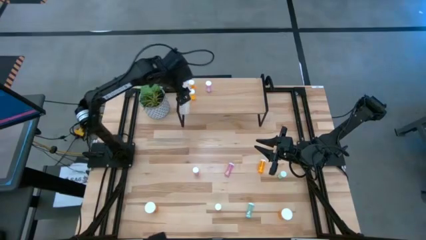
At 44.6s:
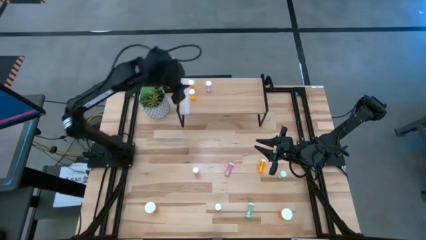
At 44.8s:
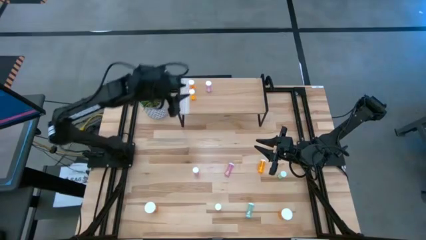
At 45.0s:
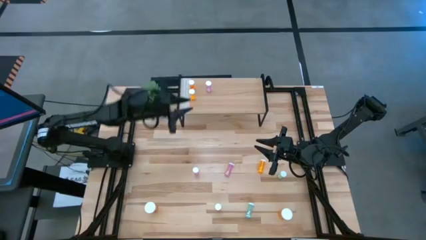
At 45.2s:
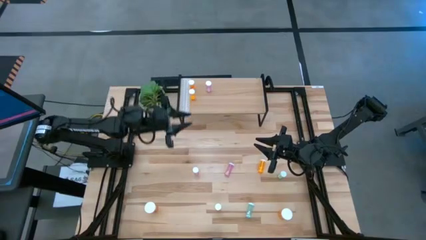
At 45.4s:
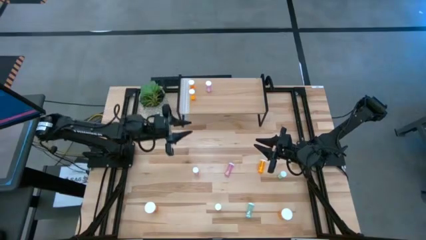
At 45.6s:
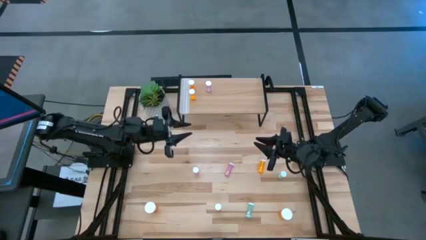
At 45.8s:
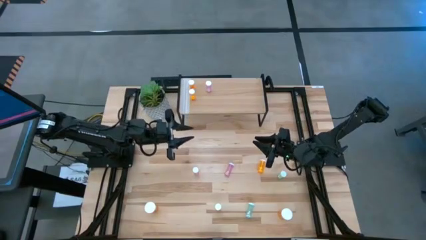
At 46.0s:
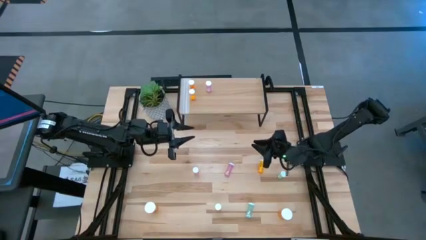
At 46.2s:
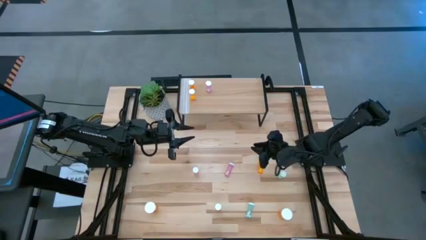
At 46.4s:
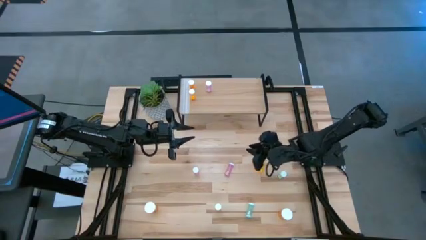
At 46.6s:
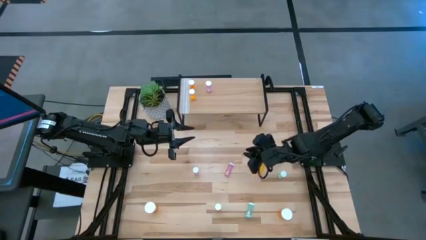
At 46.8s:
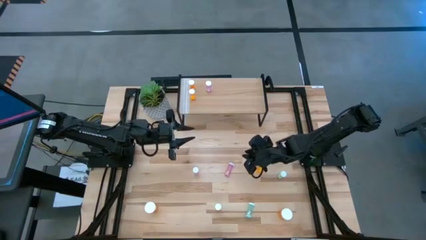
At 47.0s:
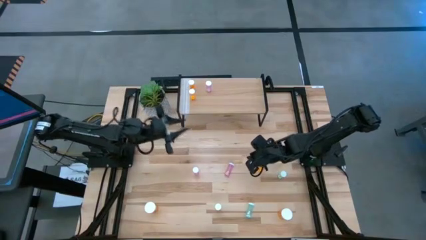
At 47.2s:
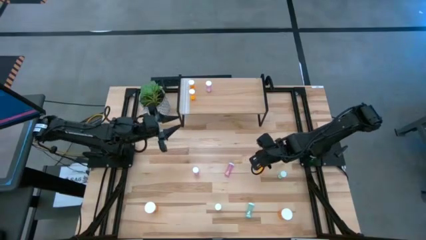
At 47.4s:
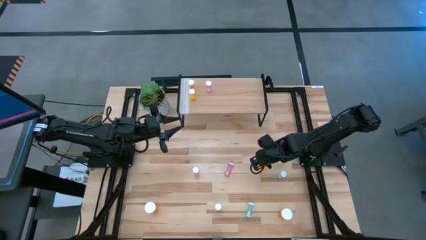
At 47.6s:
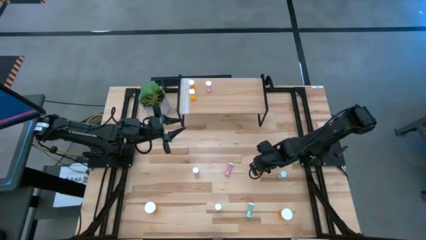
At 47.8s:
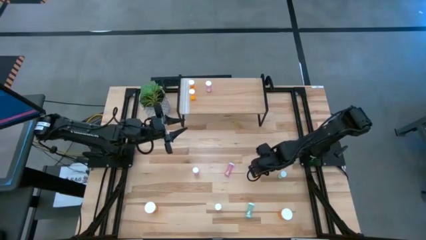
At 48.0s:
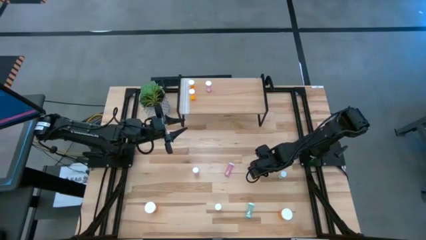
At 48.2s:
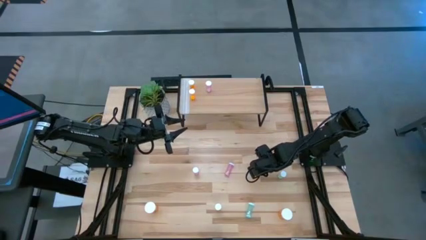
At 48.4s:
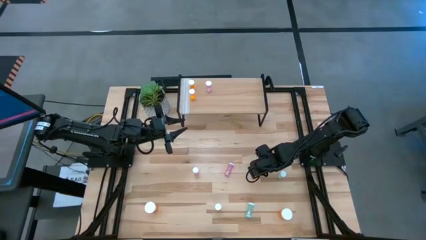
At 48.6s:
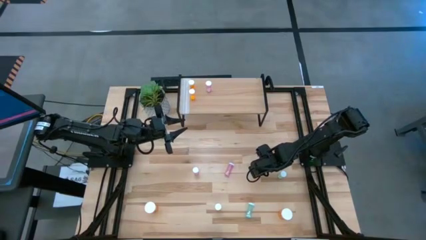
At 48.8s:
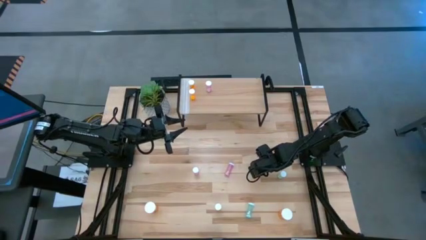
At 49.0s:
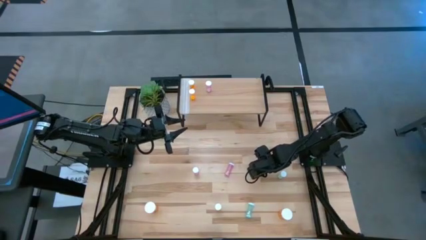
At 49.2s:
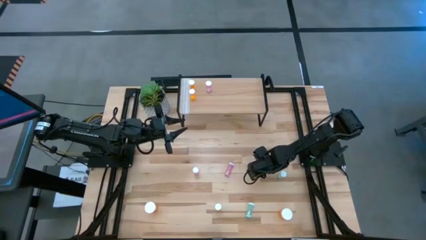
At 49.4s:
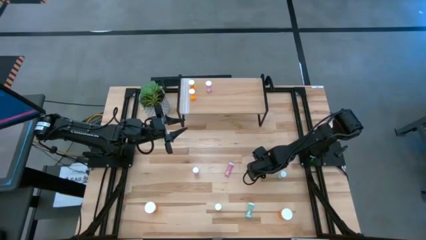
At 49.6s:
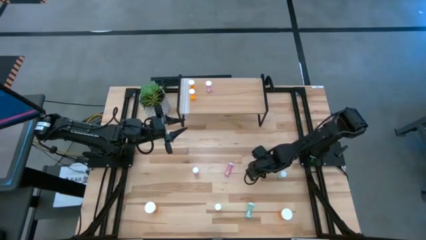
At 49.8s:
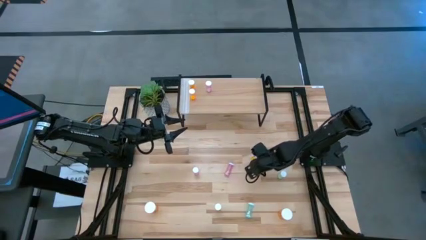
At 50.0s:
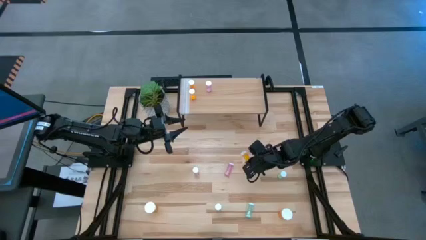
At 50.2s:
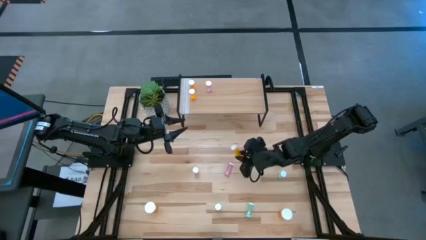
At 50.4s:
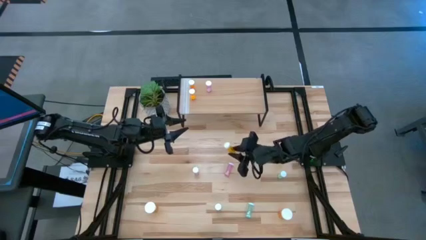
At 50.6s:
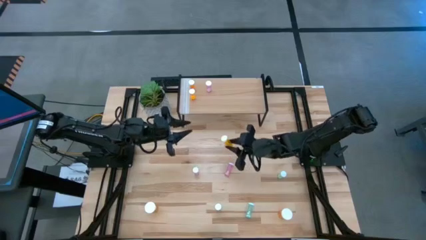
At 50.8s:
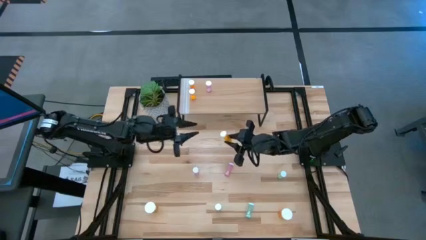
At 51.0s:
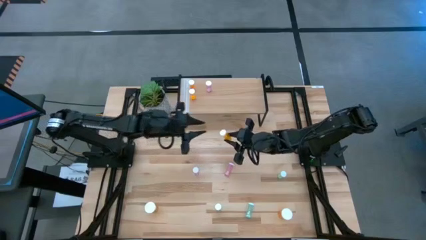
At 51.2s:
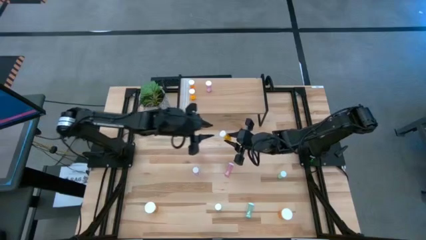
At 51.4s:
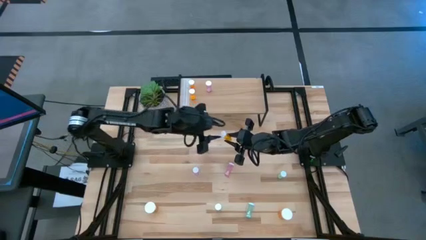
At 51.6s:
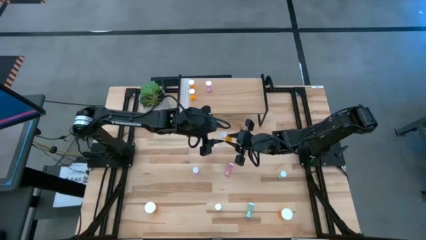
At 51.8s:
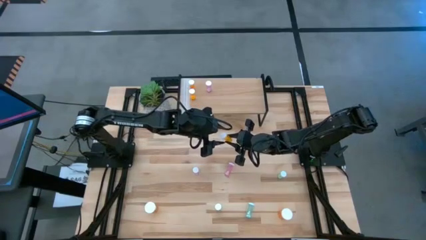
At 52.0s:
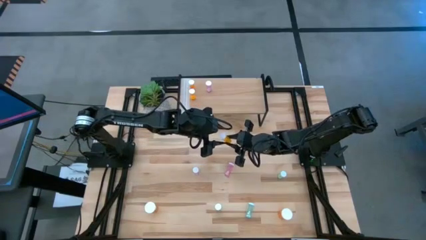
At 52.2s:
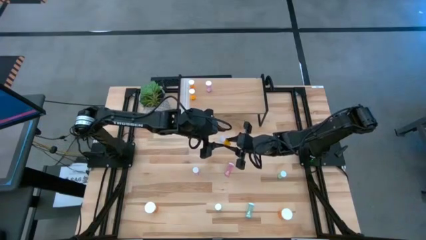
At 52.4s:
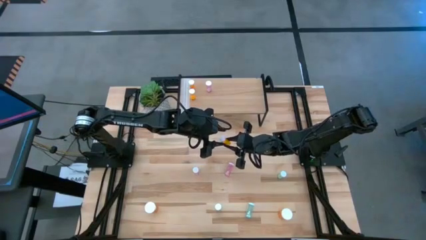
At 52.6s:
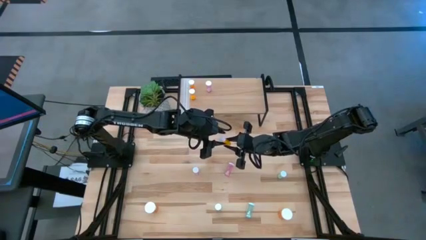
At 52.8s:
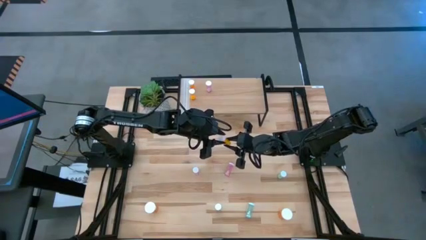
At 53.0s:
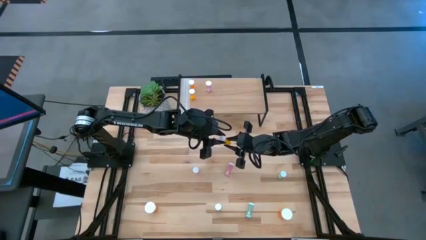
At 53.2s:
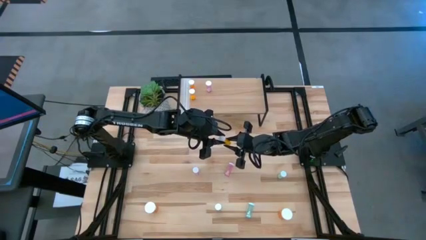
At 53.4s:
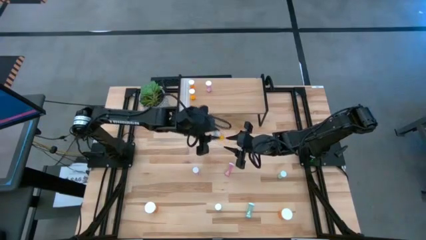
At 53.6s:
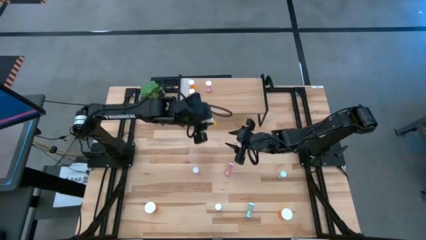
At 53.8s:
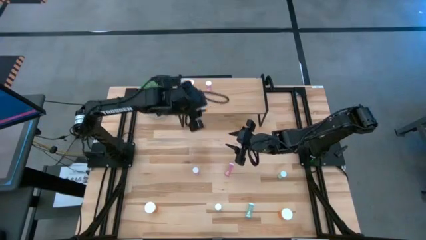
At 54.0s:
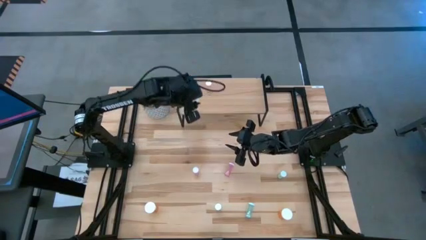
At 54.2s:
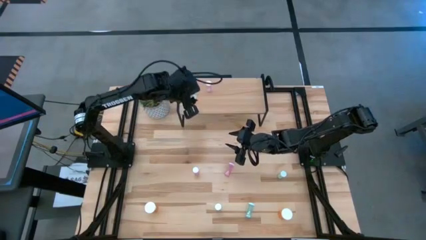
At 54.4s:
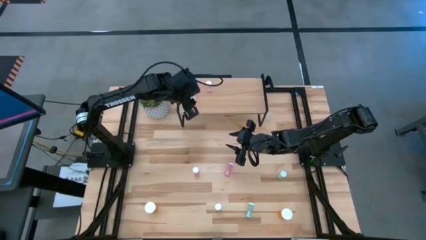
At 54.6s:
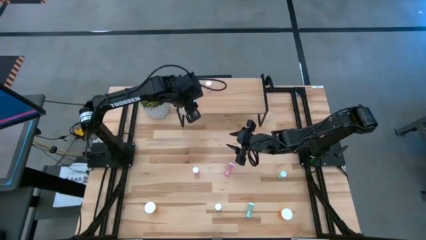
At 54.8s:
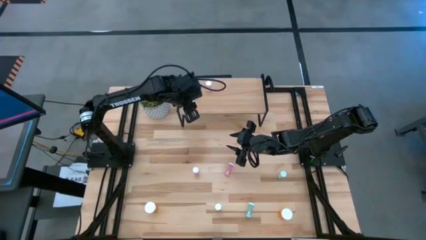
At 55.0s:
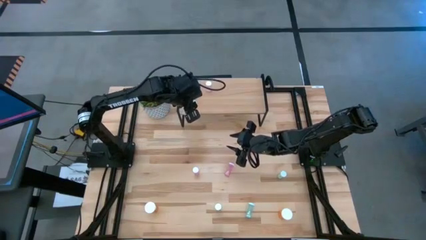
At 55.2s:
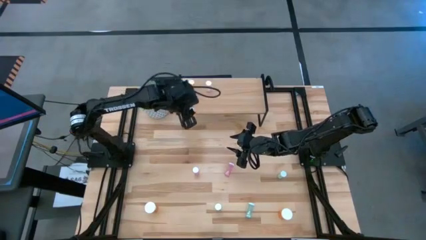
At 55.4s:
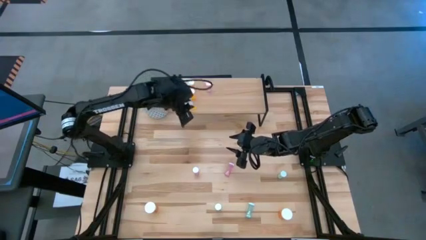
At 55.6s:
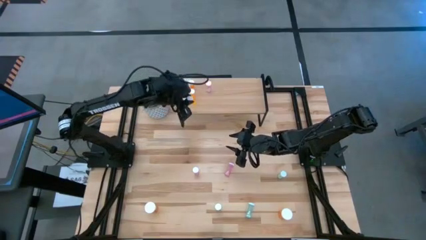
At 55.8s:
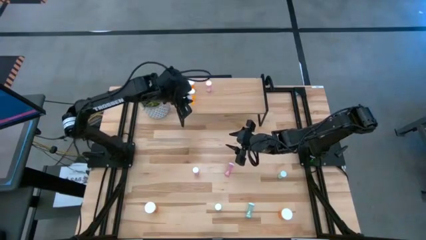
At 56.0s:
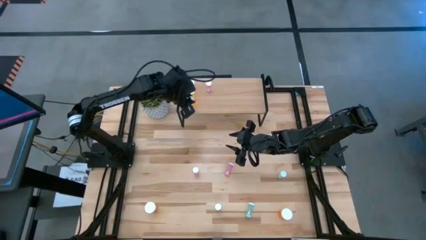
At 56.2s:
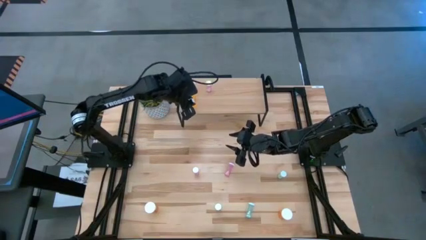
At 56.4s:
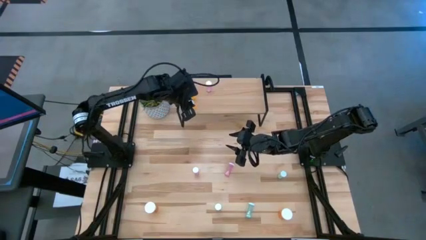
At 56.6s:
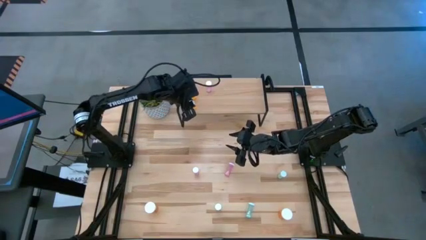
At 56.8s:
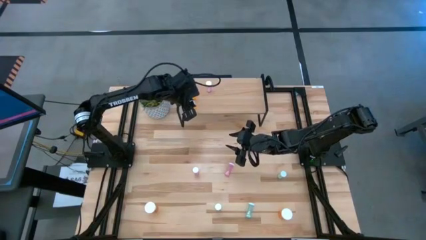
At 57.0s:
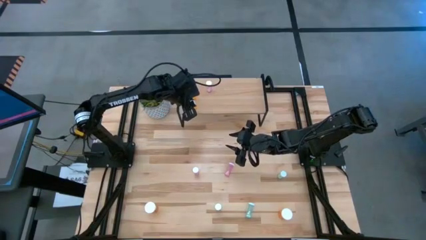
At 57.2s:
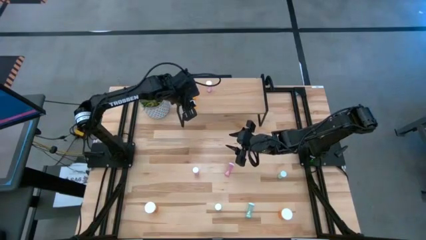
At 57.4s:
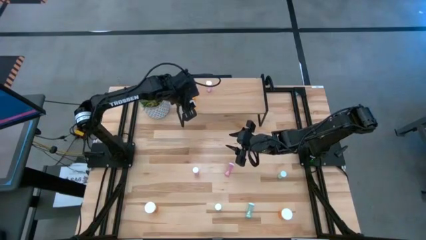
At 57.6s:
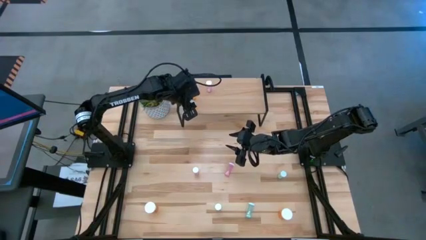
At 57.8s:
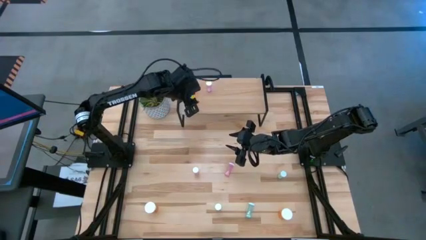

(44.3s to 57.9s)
Task: Pick and place medicine bottles onto shelf by color
Put the small orange pill bottle on the shelf aligned with the other small orange pill bottles
